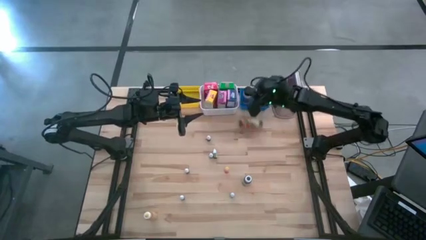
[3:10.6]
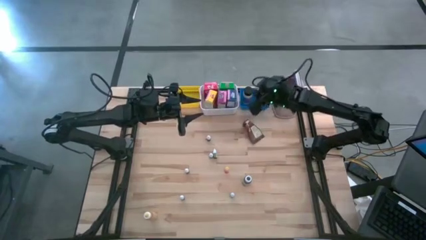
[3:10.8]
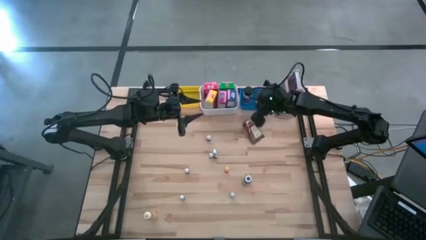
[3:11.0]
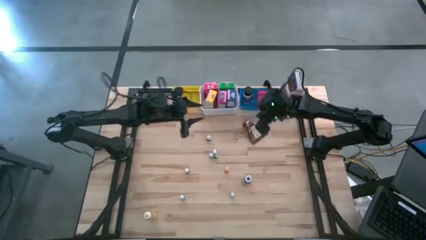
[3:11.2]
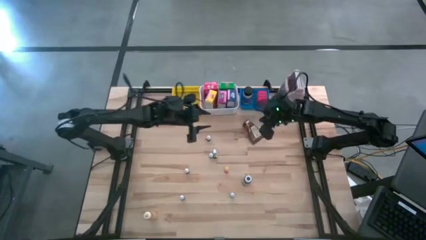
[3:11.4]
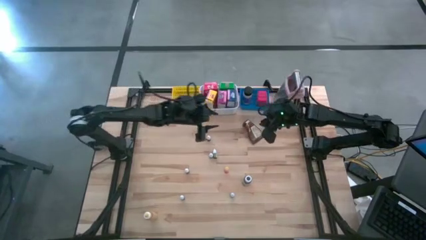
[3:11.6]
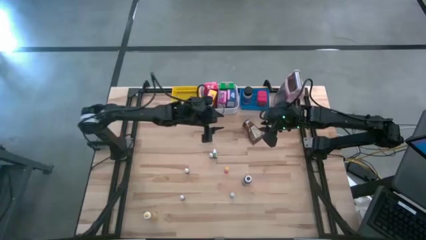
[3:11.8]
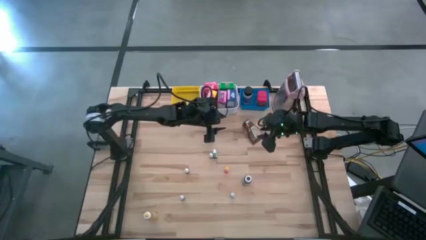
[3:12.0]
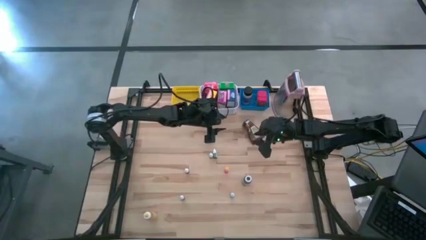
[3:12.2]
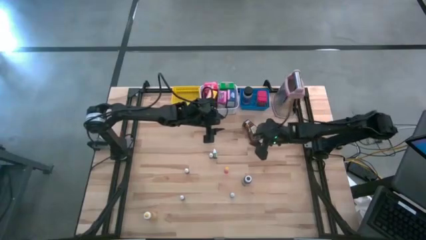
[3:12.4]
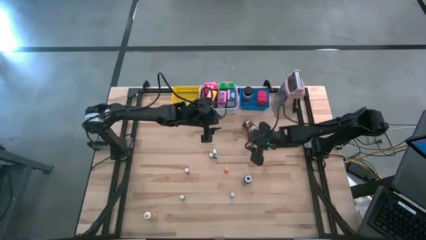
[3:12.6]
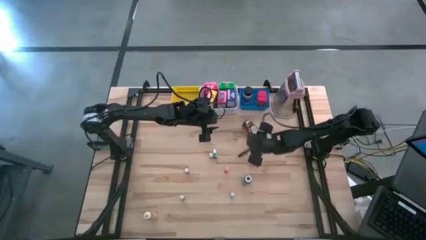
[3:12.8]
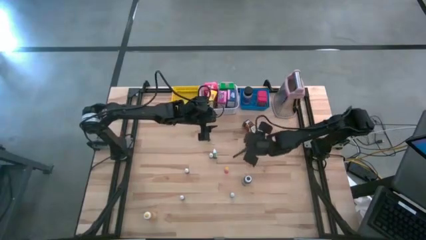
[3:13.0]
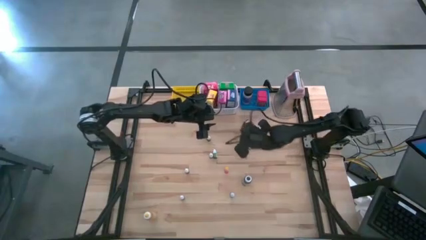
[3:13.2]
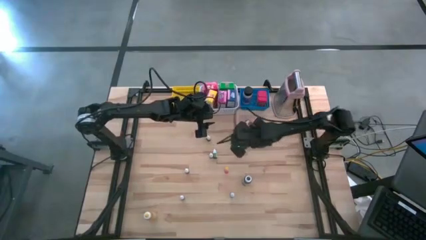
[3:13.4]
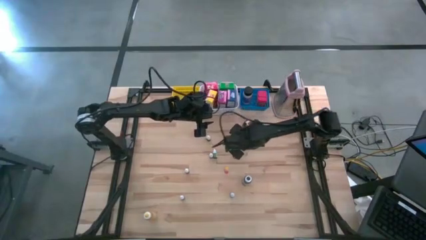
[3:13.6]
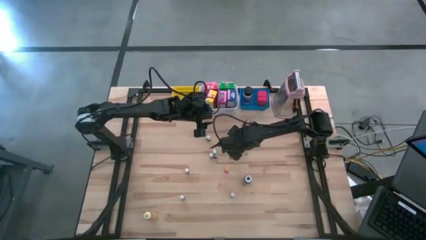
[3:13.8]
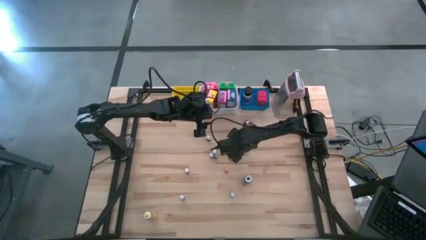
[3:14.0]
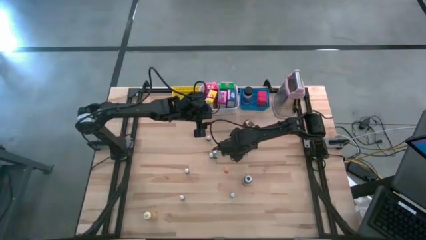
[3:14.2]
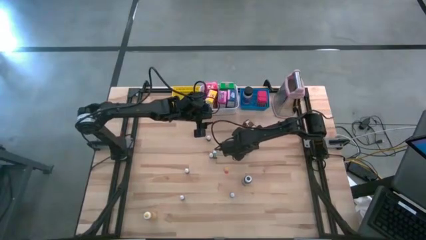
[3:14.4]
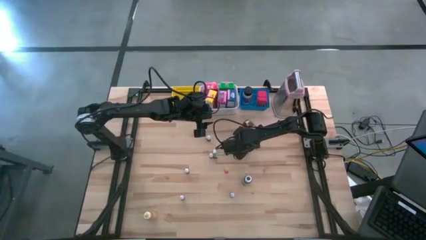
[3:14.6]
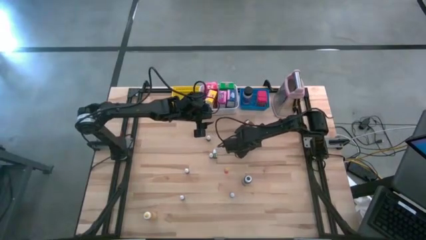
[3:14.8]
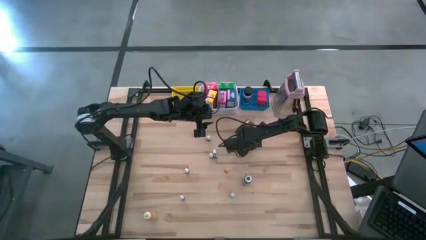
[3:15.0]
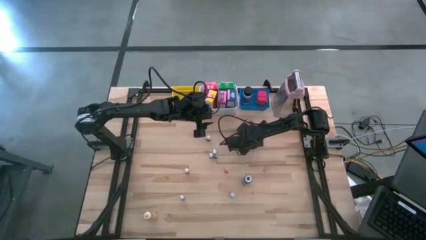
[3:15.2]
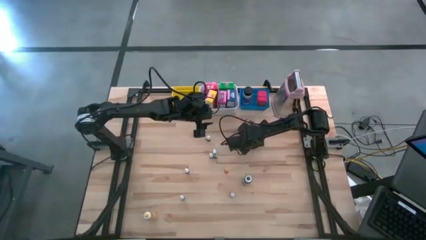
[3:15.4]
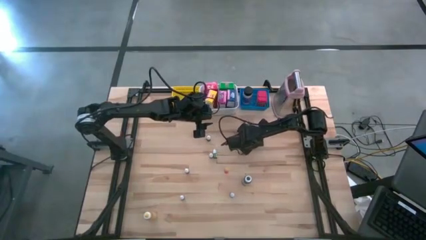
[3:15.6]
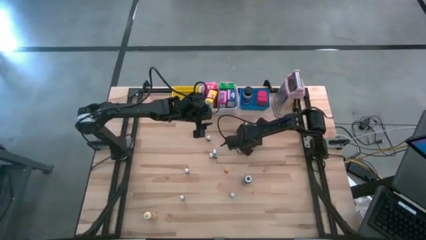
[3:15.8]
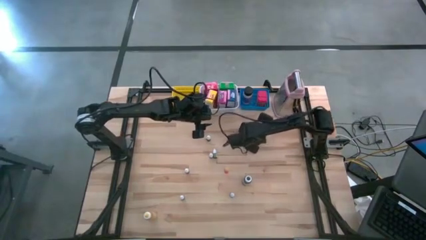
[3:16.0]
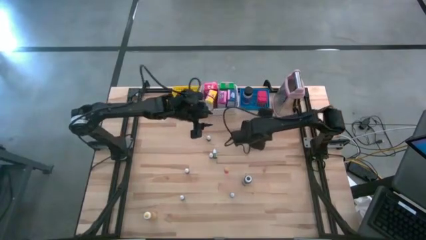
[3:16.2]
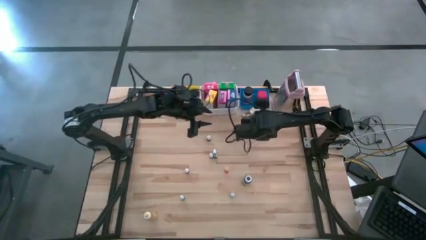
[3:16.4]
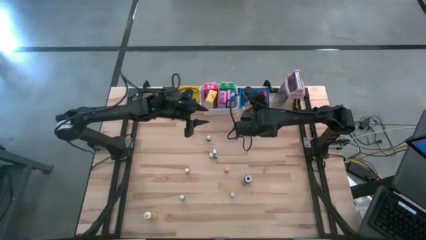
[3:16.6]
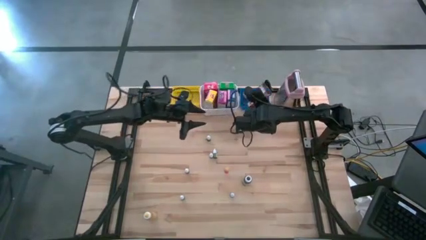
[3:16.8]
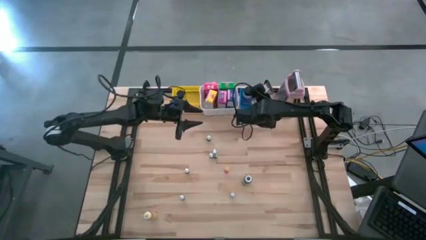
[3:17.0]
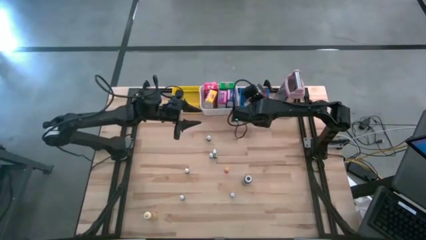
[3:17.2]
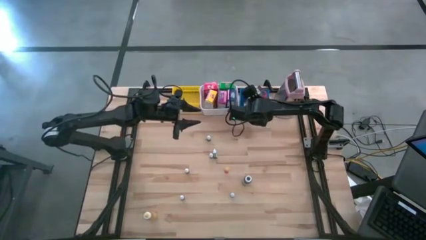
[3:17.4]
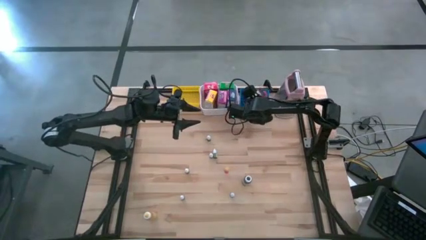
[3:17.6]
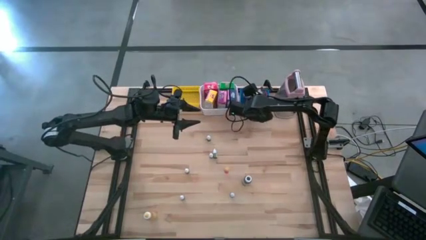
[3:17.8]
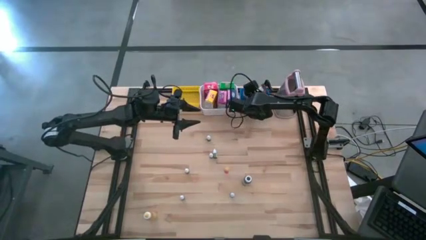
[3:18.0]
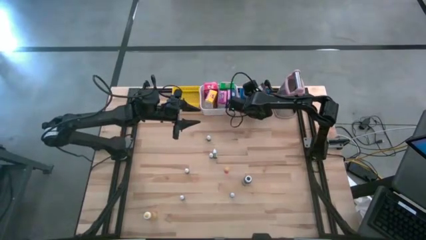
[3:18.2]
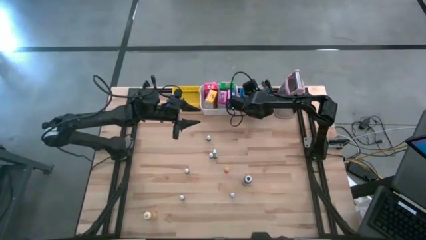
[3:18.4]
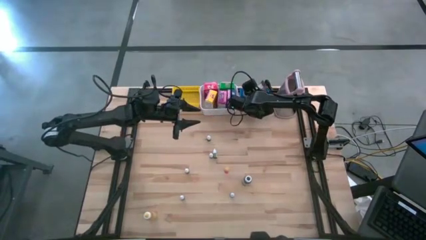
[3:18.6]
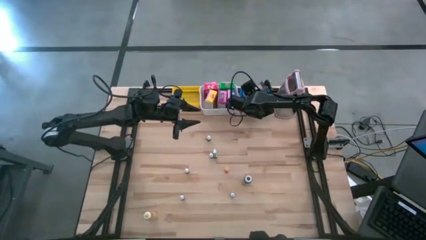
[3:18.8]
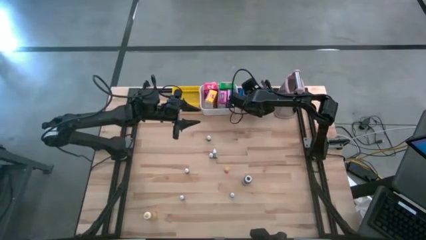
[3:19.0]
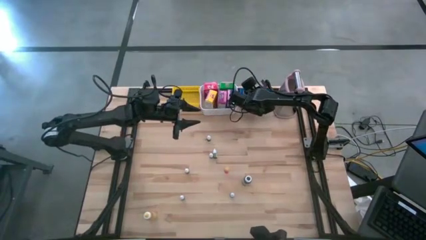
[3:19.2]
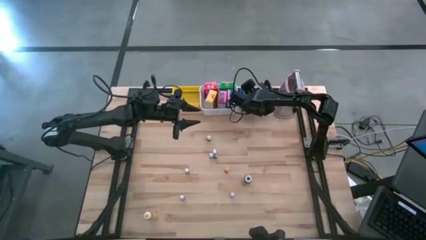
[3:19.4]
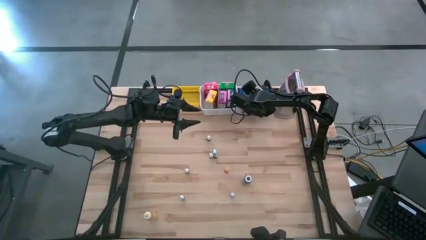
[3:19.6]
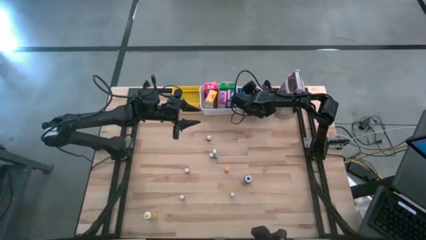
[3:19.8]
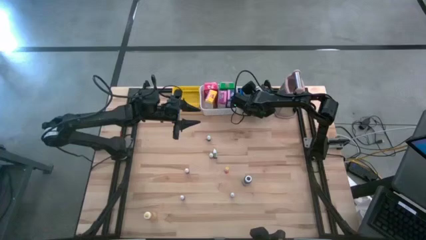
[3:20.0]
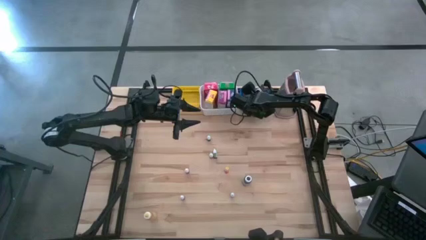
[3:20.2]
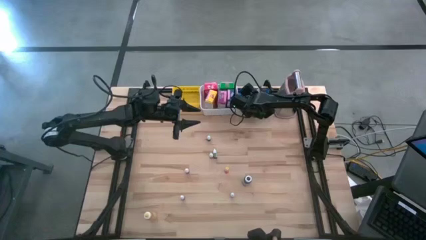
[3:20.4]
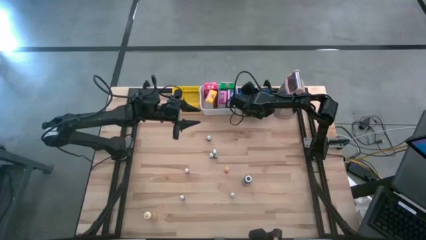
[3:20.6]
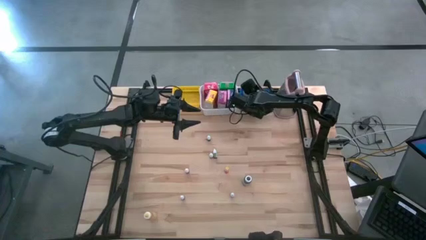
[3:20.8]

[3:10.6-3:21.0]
Task: Pick & Place Kitchen Items
Put the orange seasoning pack into the blue basket

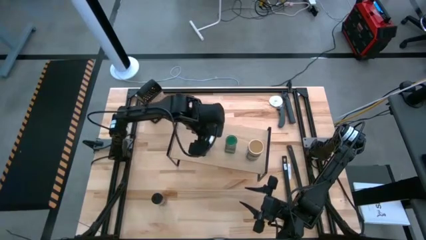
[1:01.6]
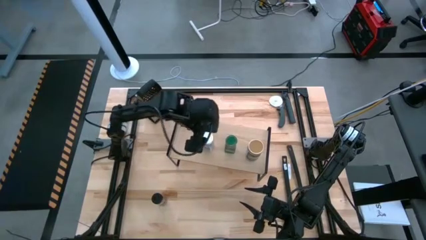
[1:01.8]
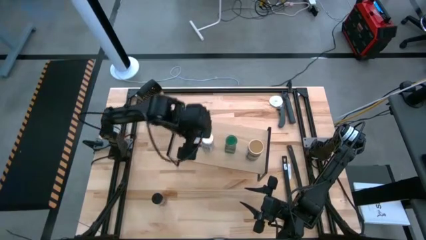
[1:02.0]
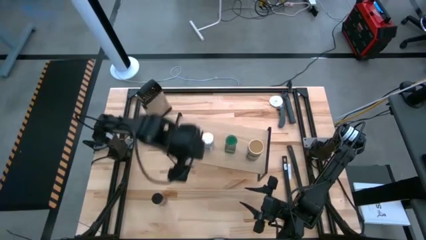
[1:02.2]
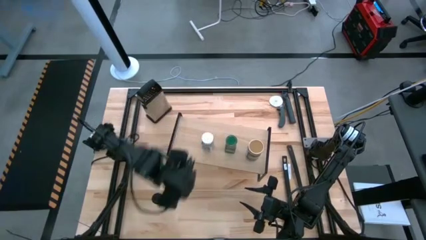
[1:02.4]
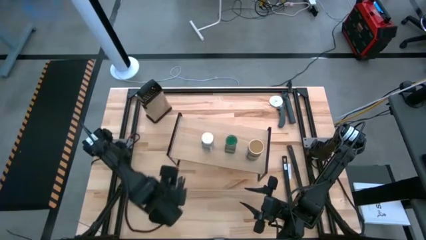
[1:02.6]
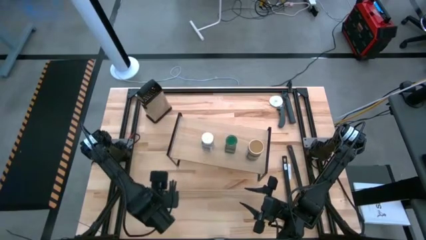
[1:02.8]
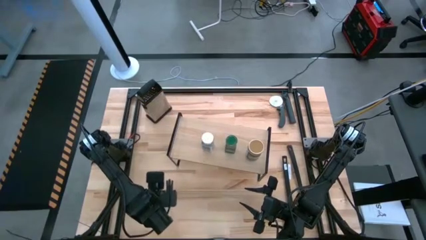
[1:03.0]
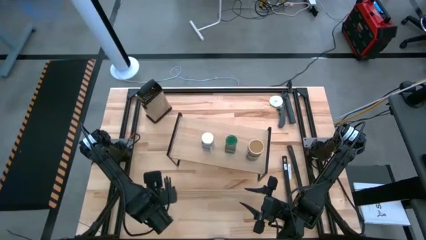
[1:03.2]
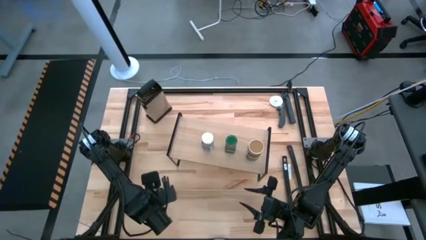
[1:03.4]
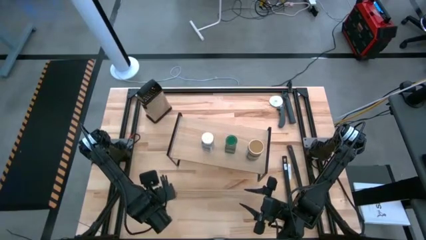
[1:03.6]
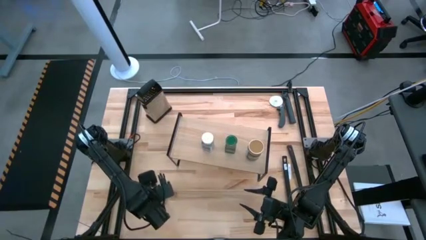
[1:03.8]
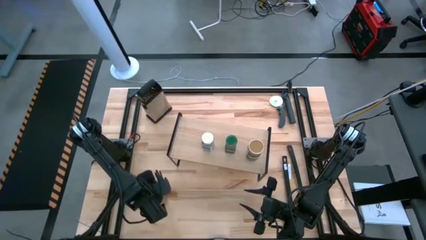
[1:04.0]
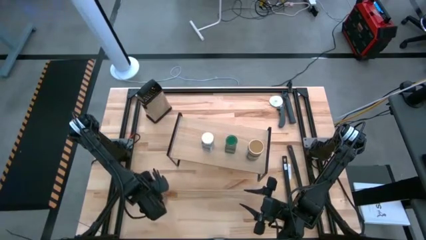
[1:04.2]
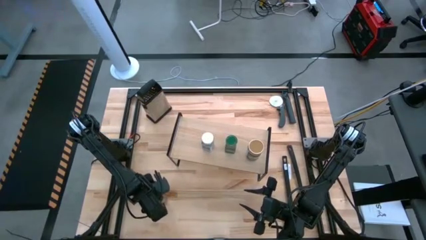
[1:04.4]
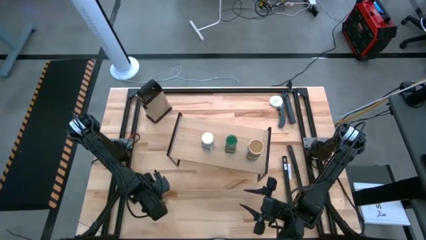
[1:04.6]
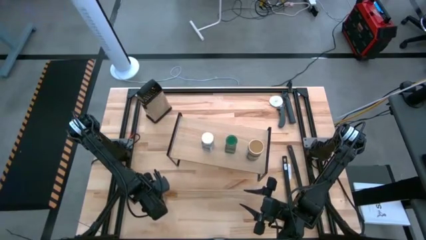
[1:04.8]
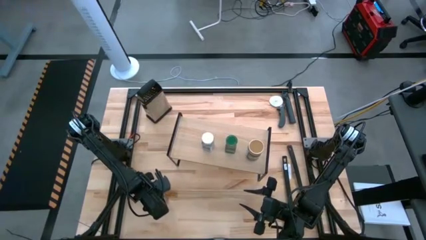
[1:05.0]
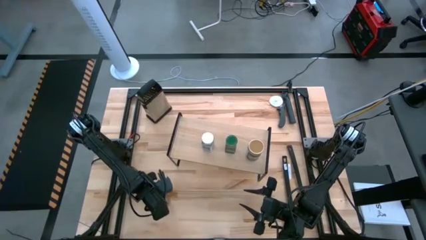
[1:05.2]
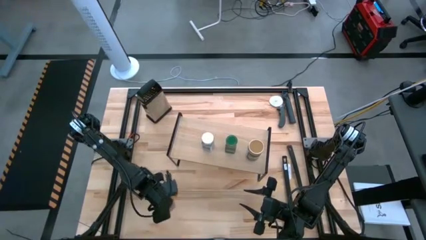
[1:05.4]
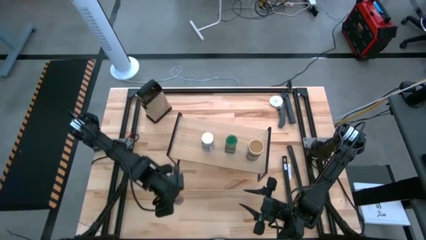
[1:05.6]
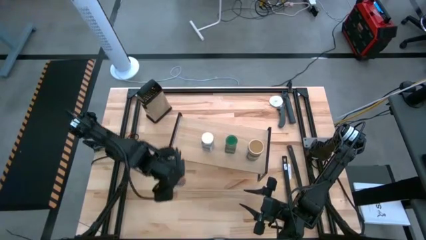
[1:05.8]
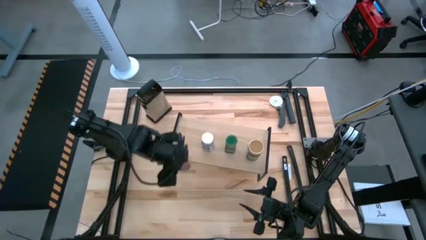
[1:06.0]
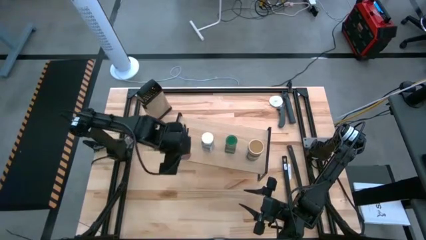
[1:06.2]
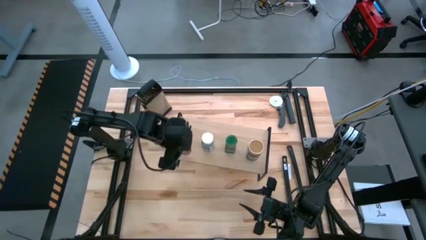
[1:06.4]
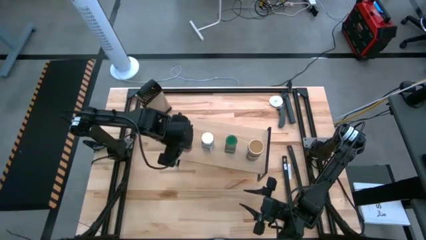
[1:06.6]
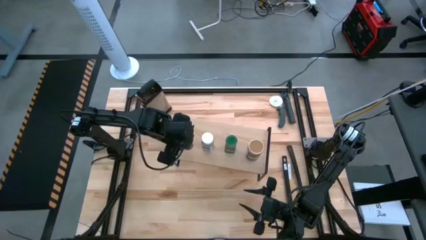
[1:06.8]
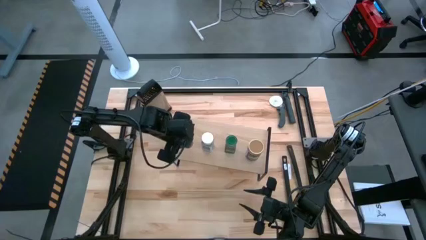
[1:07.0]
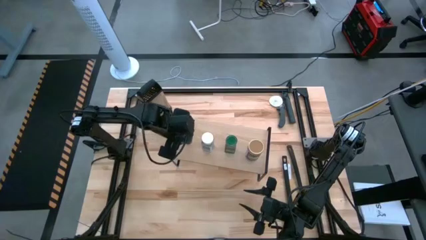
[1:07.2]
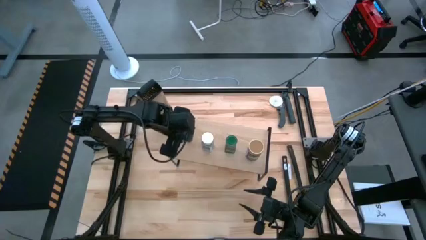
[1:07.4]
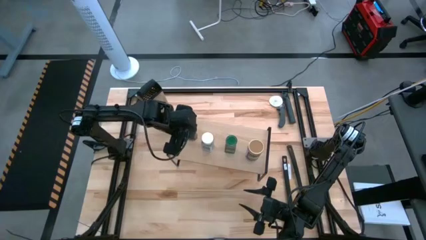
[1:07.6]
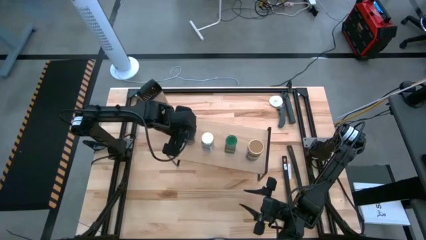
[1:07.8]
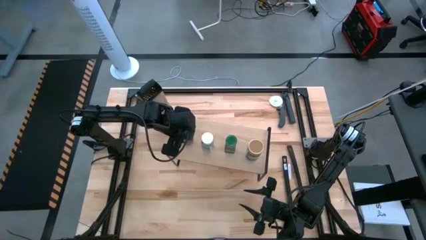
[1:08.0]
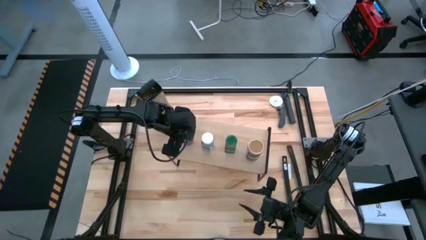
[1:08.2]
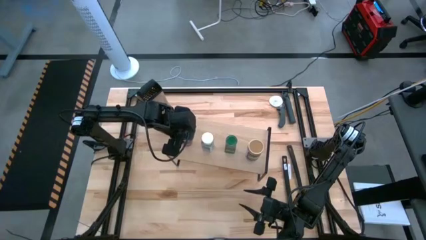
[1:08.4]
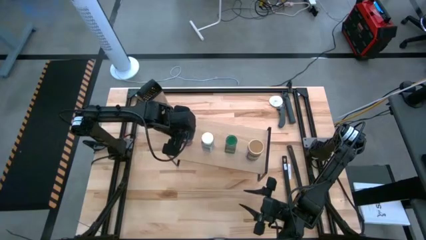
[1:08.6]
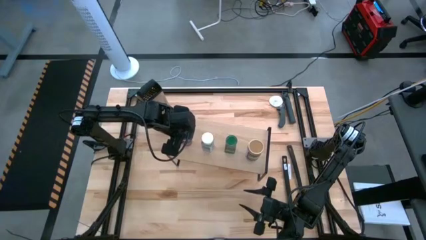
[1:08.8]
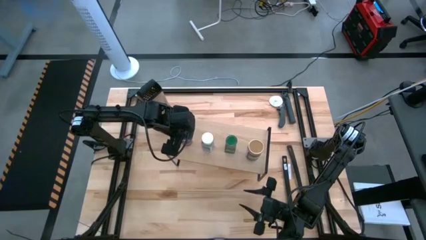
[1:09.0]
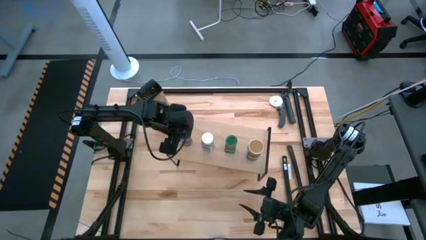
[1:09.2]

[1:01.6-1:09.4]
Task: Shelf spices
Put the black seasoning bottle on the shelf
